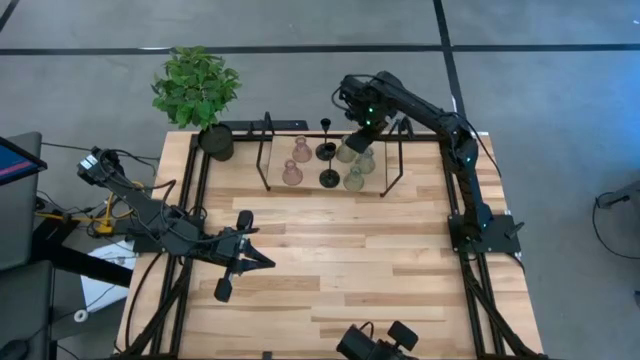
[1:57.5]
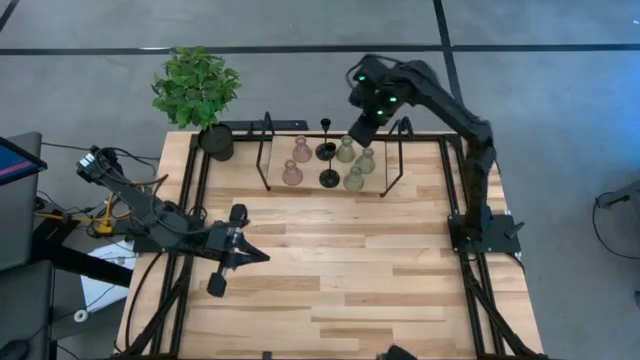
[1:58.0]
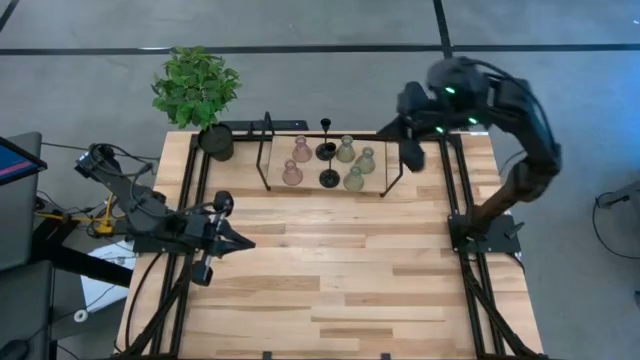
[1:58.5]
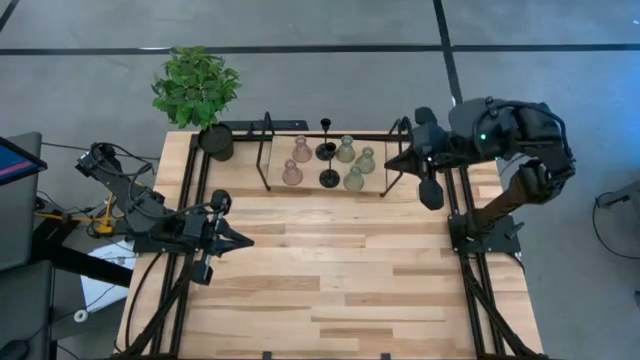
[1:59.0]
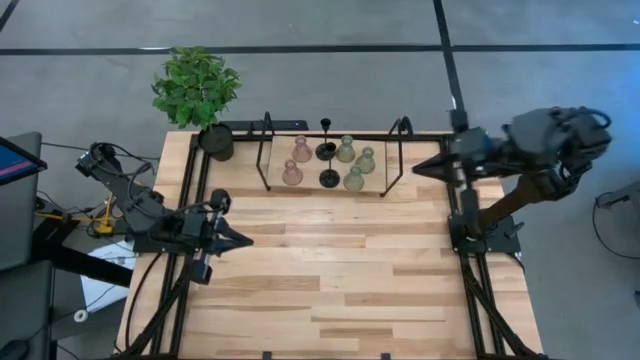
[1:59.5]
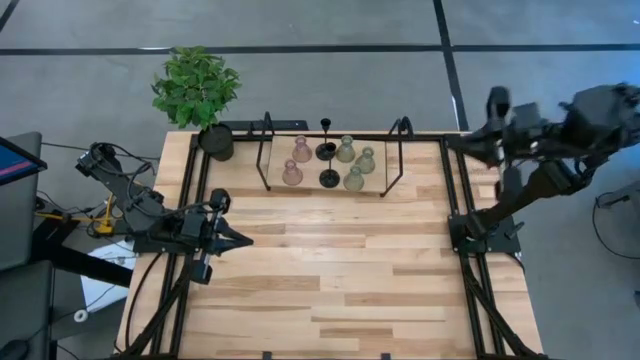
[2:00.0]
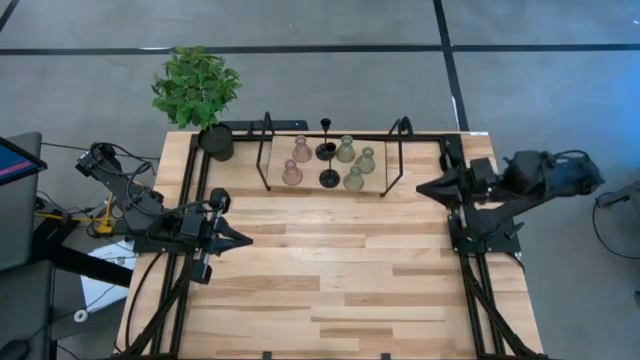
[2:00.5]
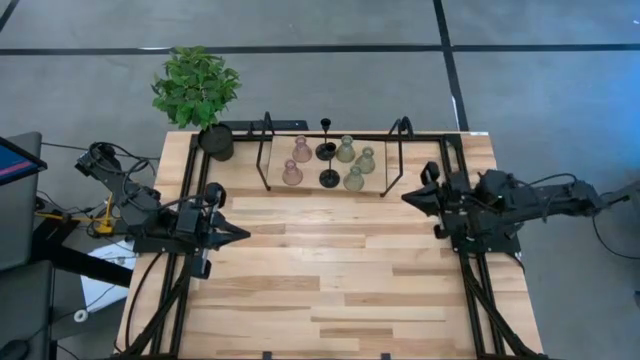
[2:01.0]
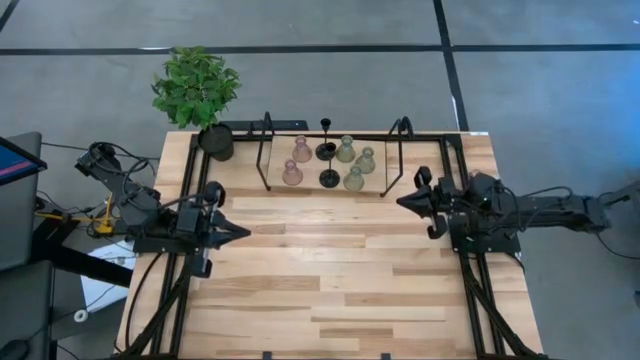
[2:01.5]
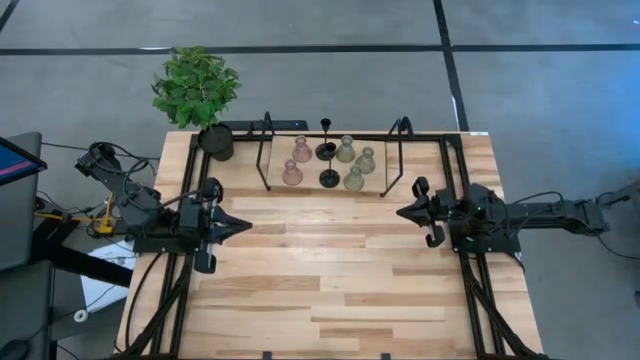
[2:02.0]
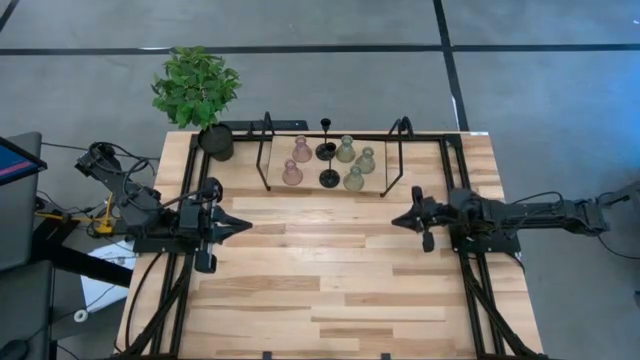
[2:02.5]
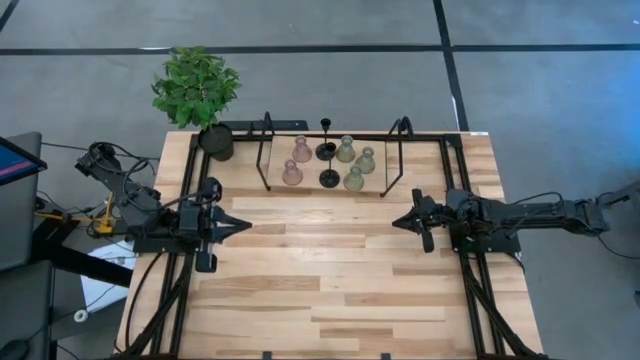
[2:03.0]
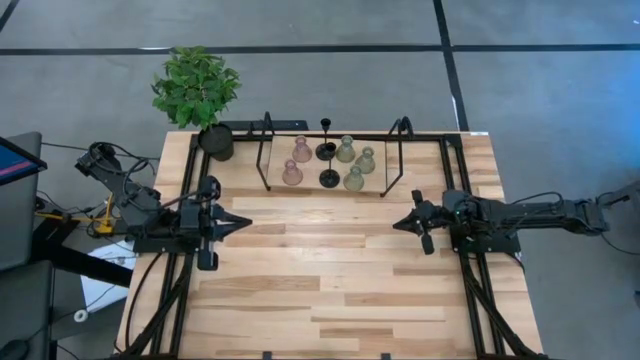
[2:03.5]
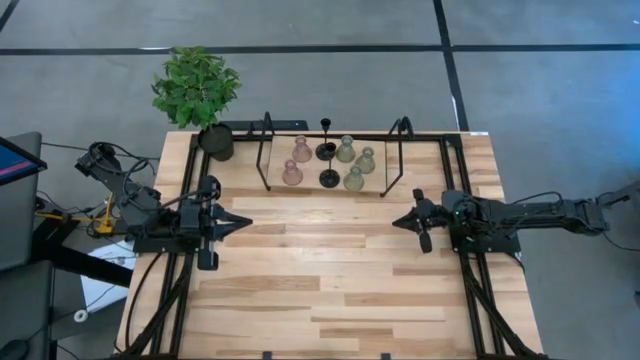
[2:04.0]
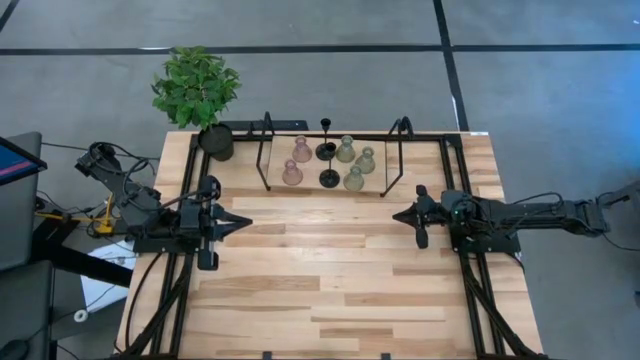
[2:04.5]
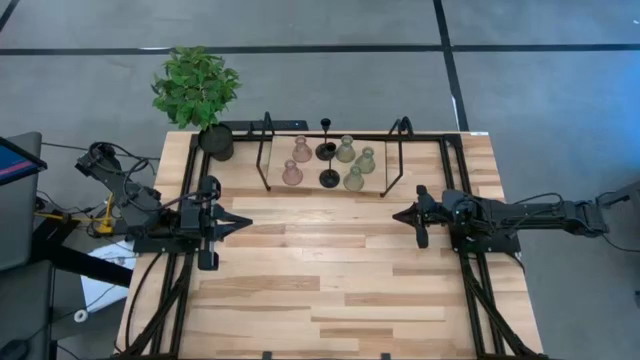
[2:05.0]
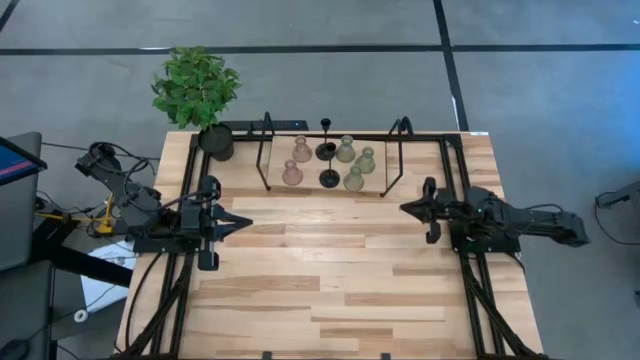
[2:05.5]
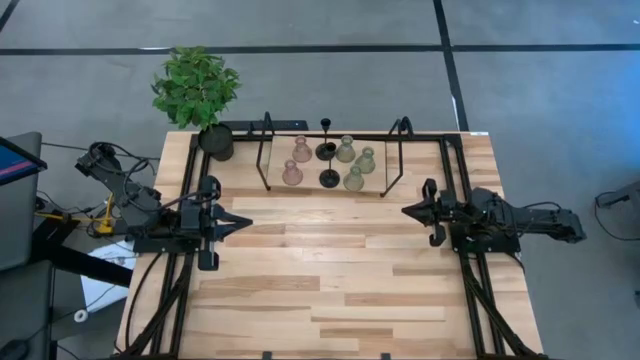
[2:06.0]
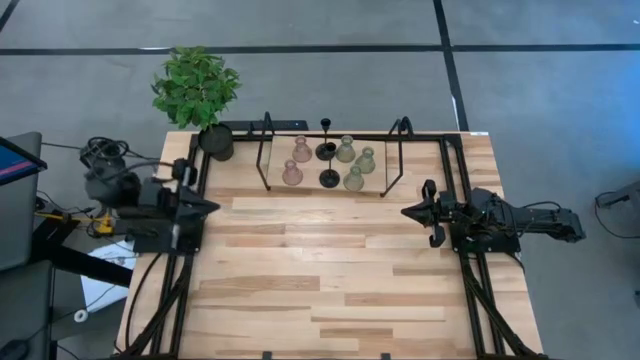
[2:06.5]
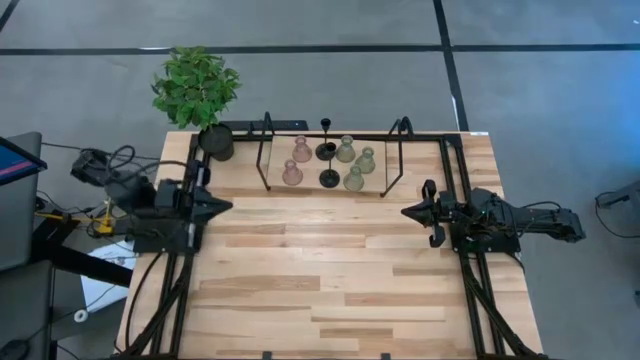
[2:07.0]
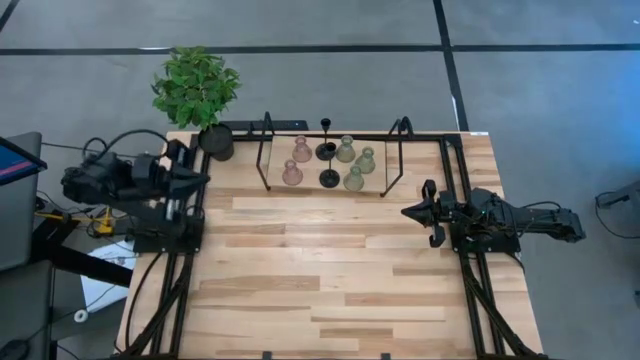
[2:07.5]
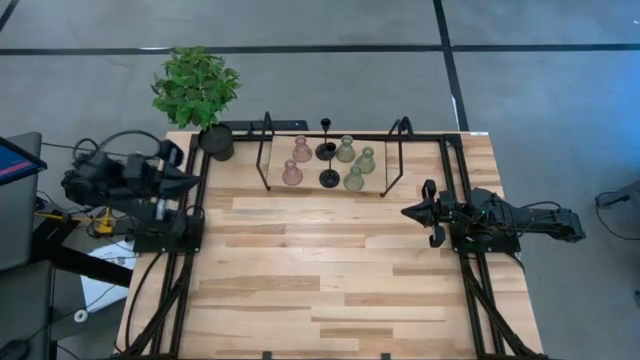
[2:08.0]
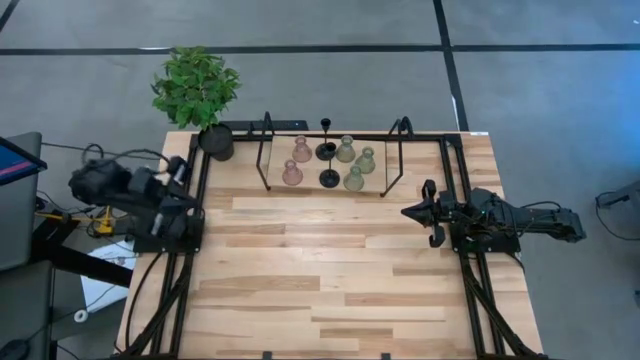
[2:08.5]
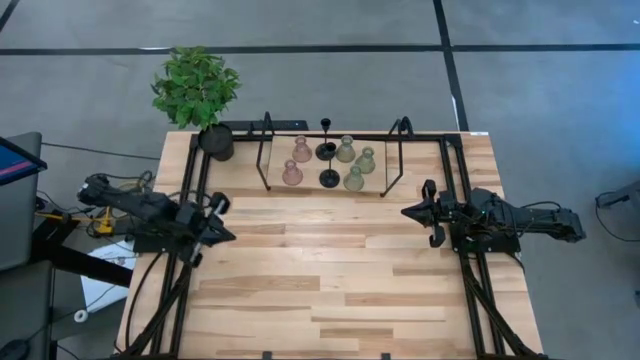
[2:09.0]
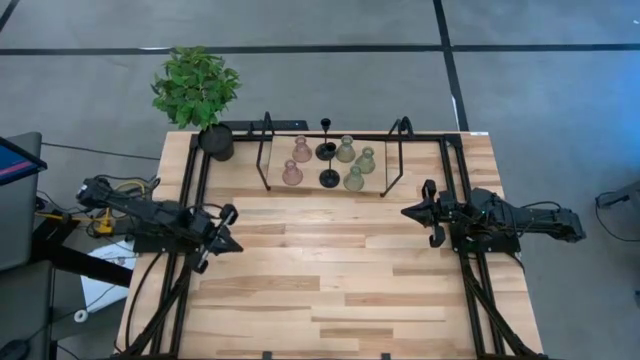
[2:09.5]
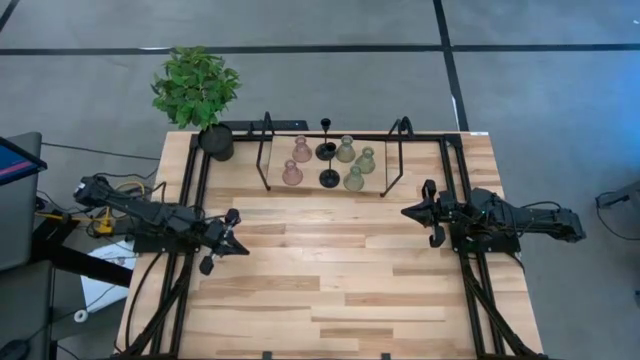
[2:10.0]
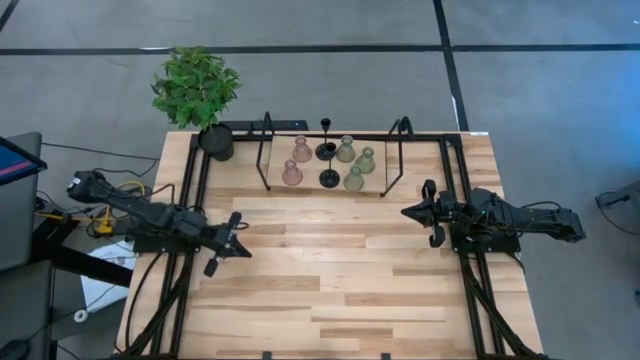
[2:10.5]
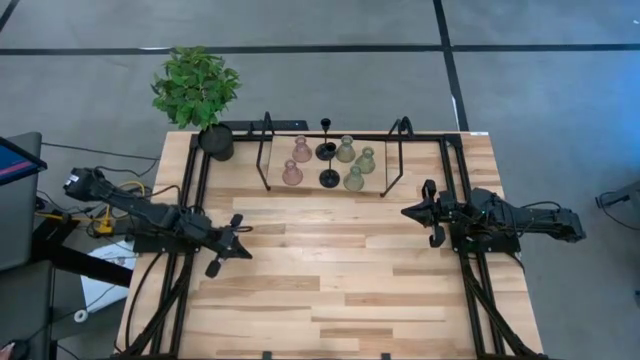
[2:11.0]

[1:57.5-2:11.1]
Task: Pick & Place candle stick holders
Return to Home Position

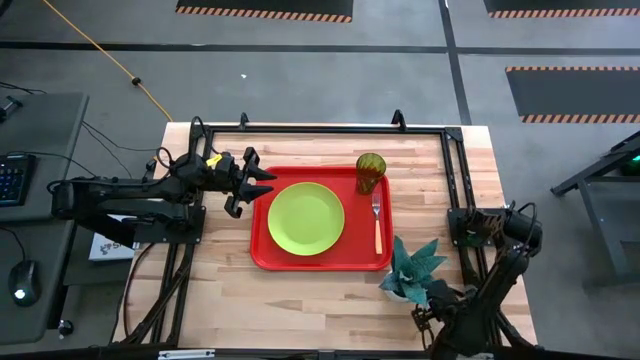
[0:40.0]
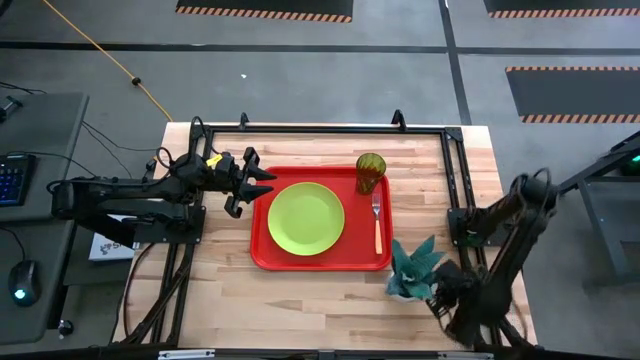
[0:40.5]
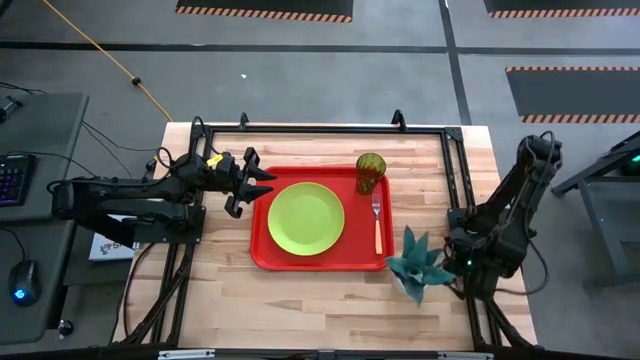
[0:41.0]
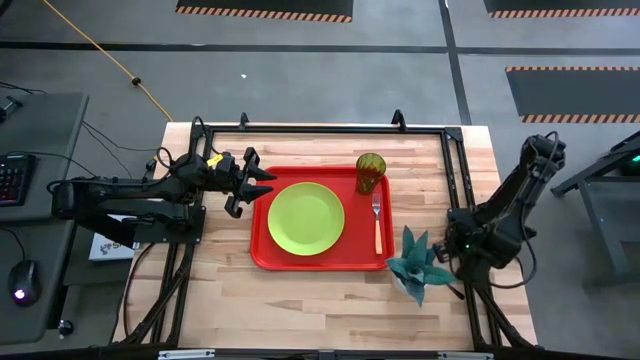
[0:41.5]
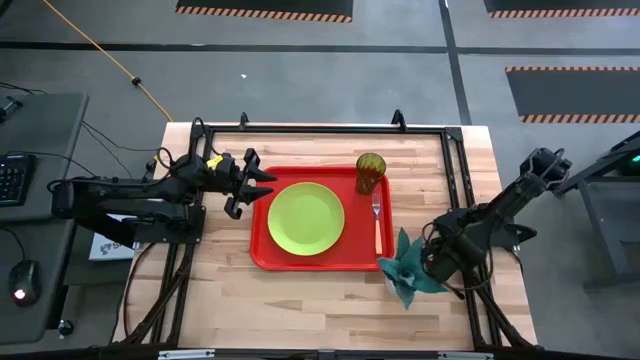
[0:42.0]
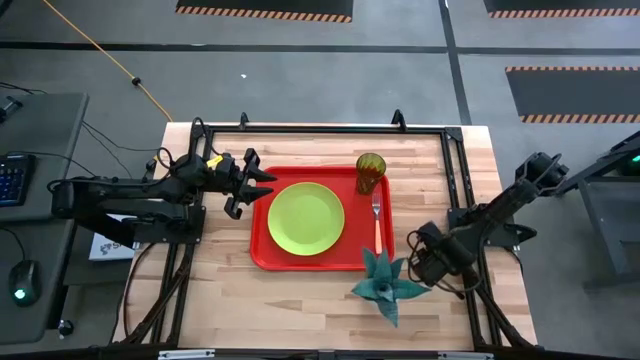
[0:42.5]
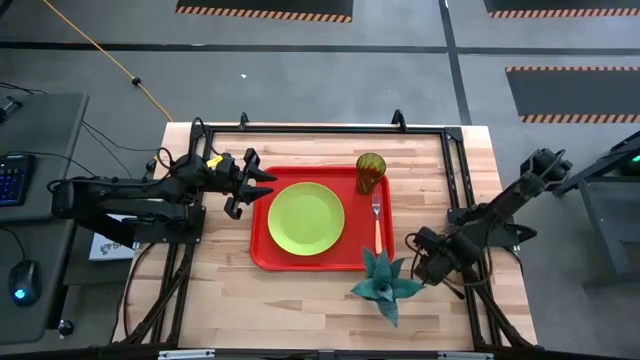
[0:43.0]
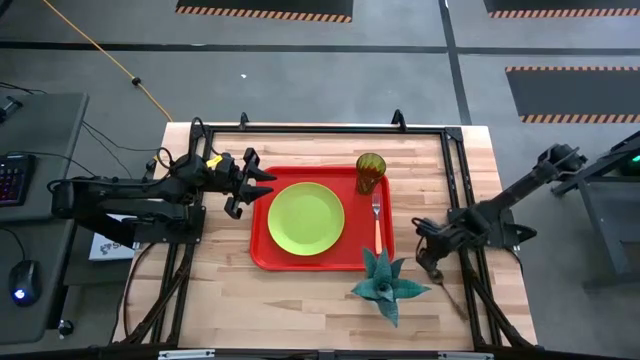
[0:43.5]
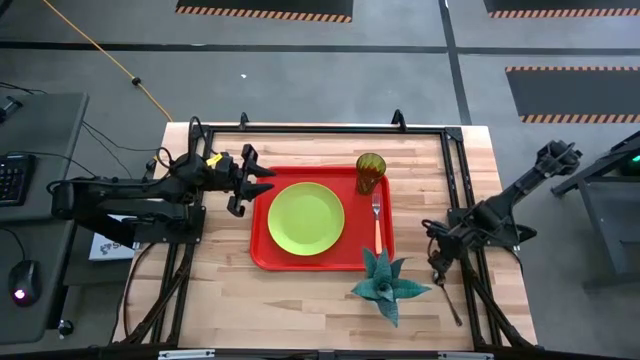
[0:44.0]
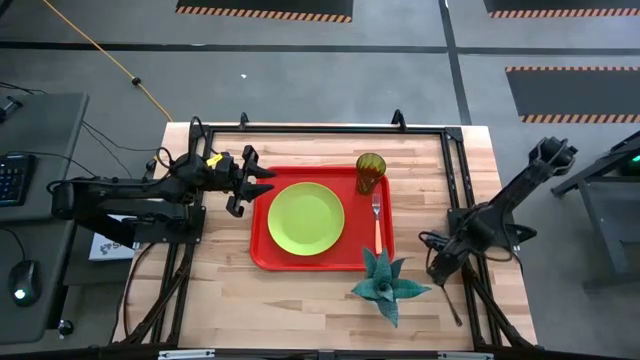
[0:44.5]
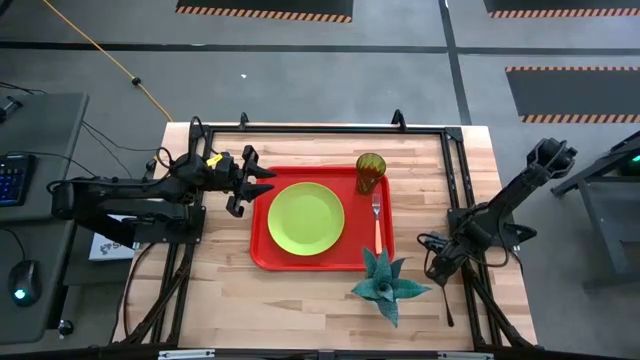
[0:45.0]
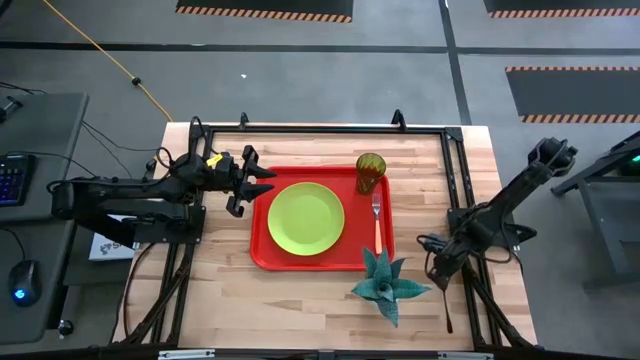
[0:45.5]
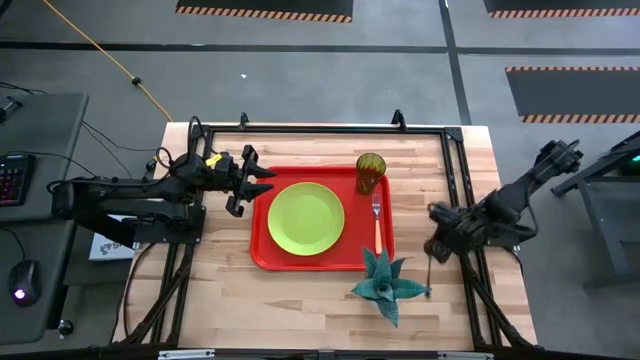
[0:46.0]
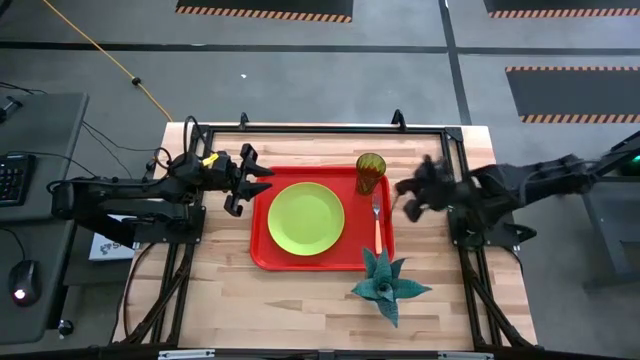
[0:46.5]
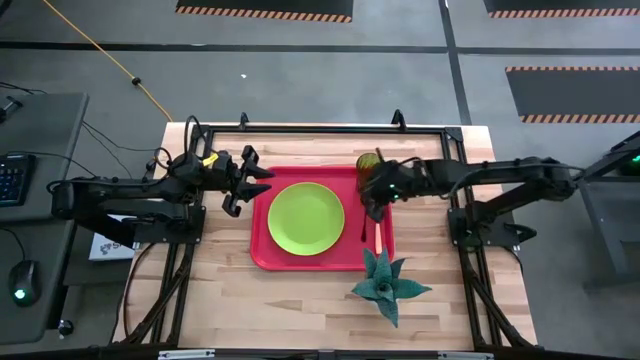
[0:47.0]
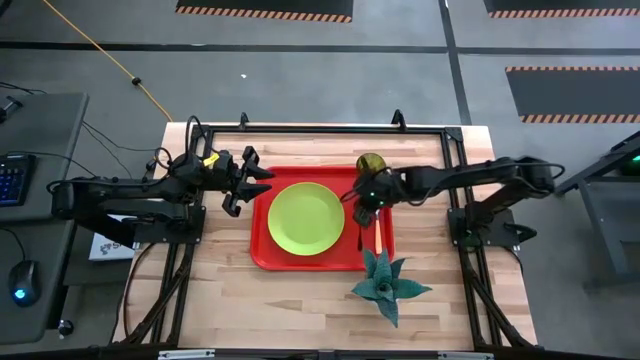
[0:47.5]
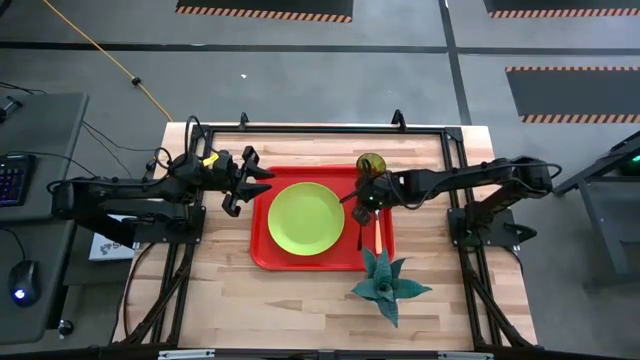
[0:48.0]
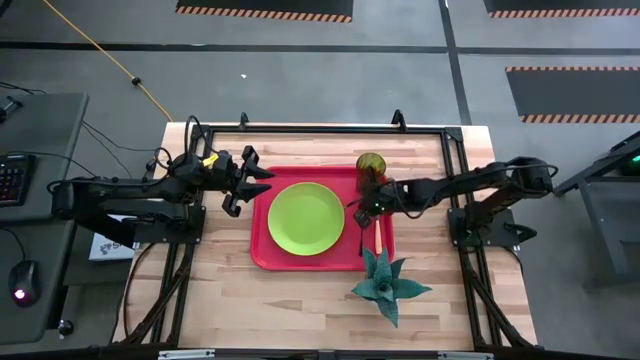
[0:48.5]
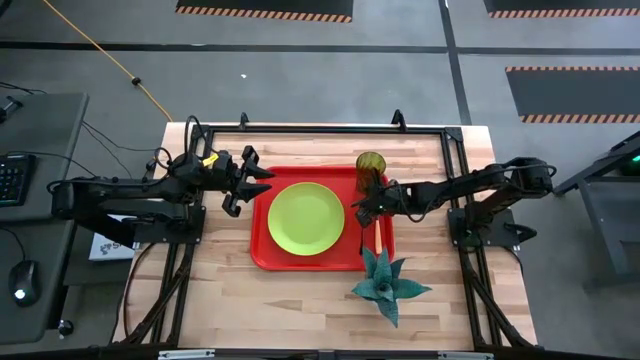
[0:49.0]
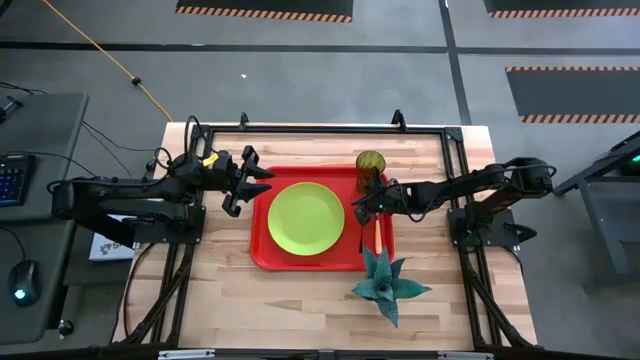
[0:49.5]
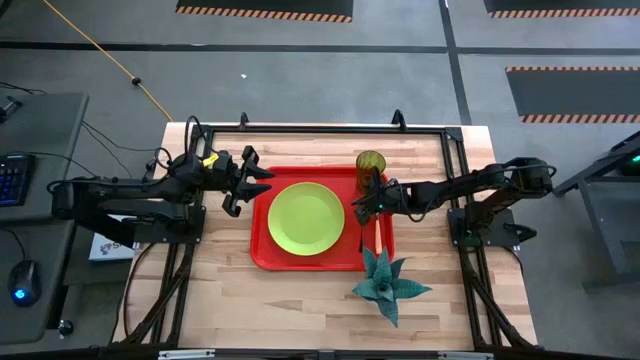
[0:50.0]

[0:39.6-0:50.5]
Task: Pick and place plate/cup/fork/spoon on tray
Put the black spoon on the red serving tray between the green plate and orange fork
